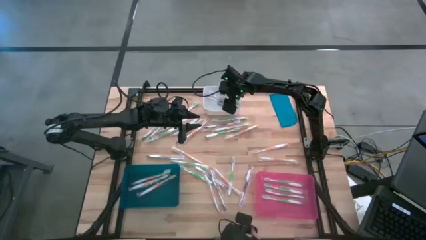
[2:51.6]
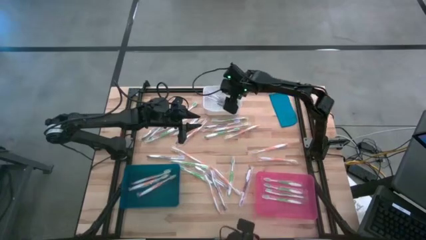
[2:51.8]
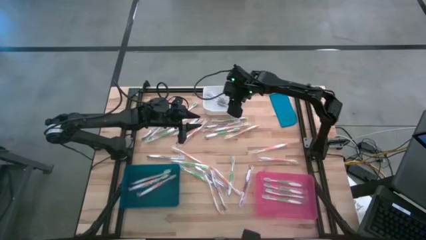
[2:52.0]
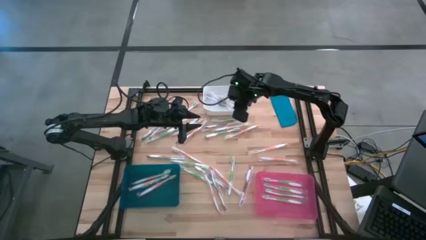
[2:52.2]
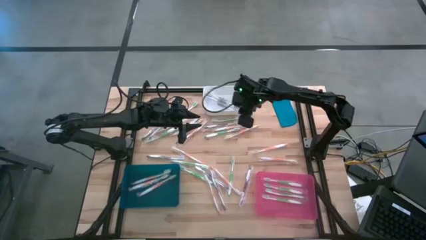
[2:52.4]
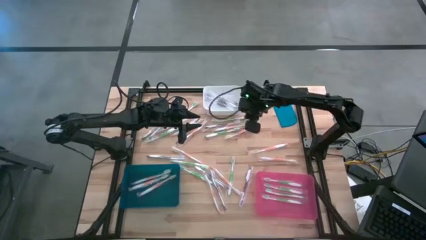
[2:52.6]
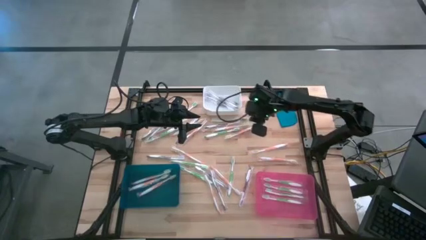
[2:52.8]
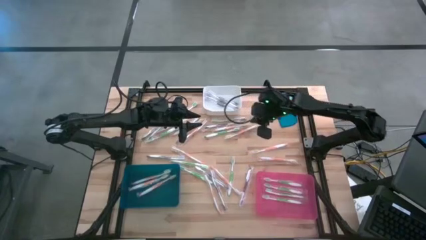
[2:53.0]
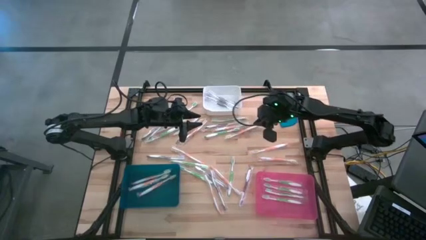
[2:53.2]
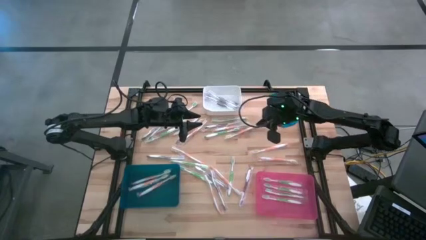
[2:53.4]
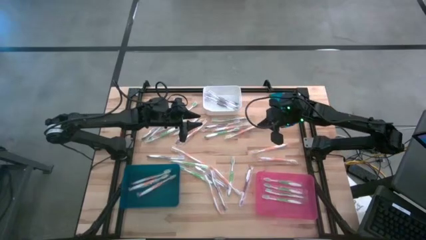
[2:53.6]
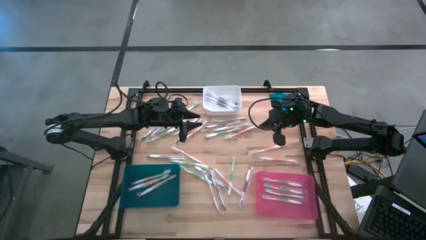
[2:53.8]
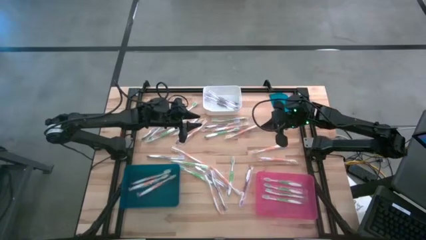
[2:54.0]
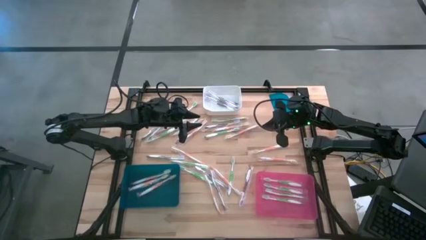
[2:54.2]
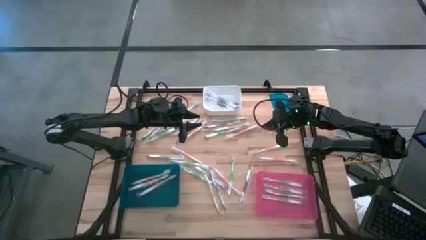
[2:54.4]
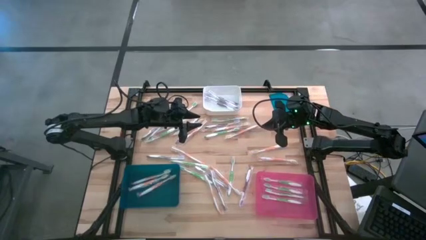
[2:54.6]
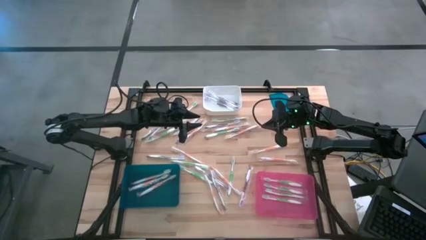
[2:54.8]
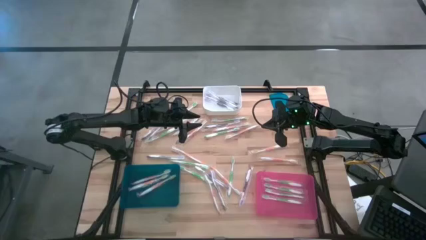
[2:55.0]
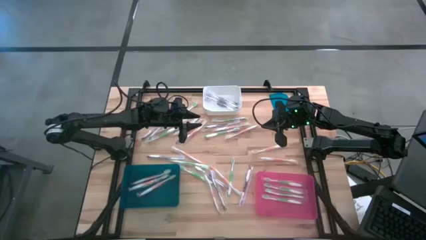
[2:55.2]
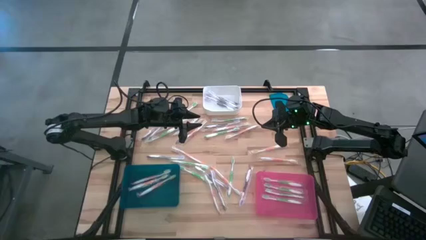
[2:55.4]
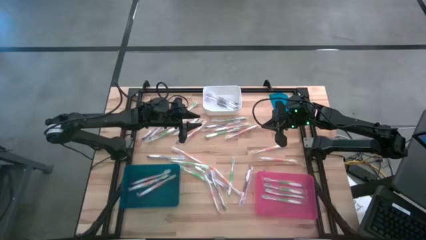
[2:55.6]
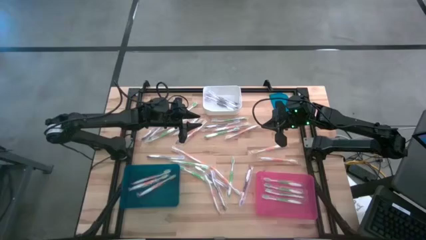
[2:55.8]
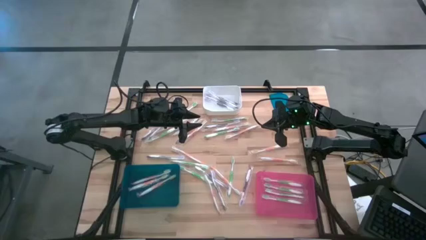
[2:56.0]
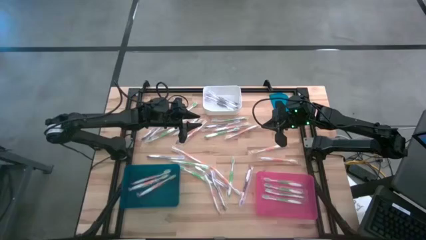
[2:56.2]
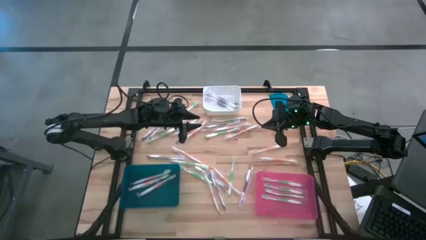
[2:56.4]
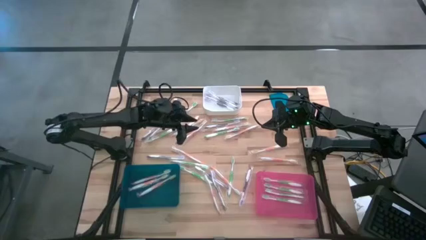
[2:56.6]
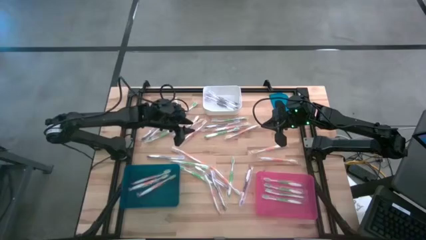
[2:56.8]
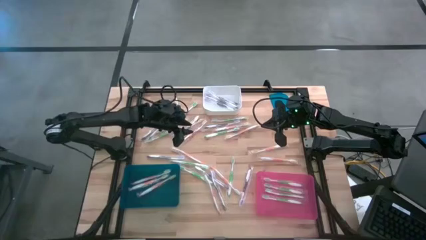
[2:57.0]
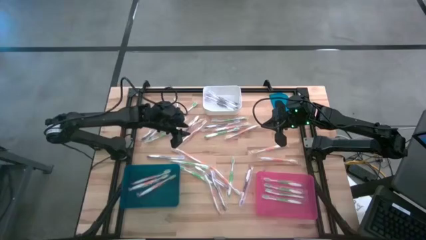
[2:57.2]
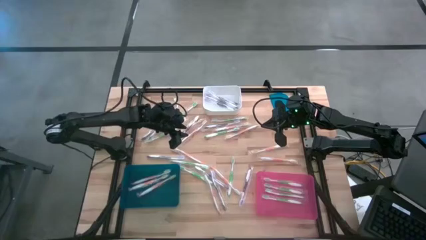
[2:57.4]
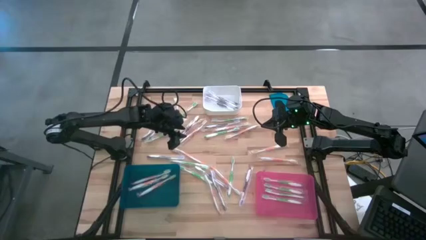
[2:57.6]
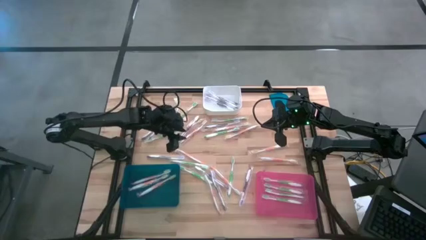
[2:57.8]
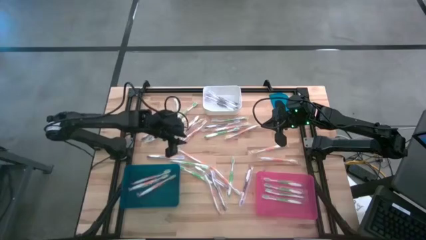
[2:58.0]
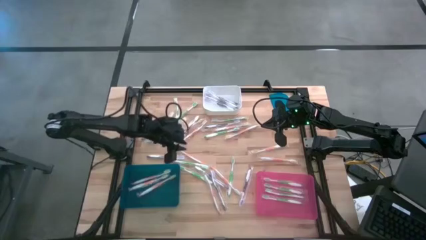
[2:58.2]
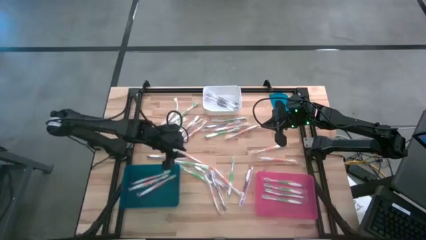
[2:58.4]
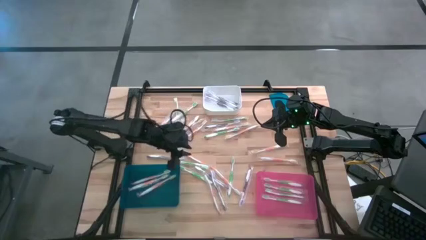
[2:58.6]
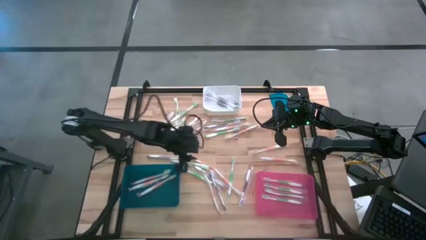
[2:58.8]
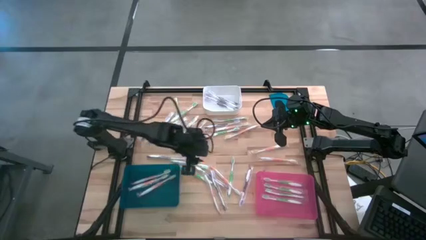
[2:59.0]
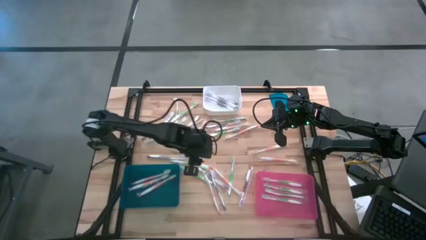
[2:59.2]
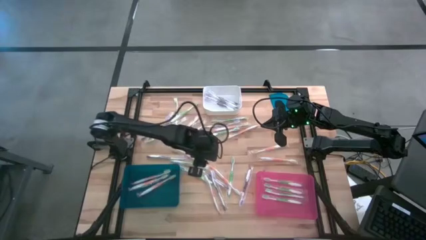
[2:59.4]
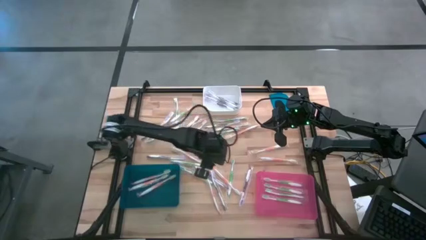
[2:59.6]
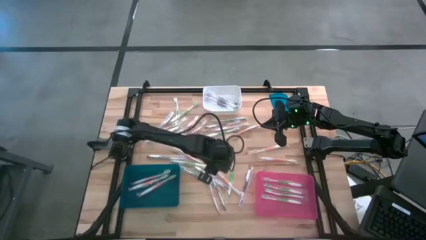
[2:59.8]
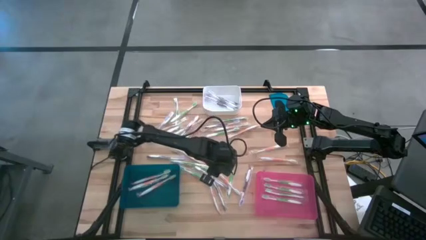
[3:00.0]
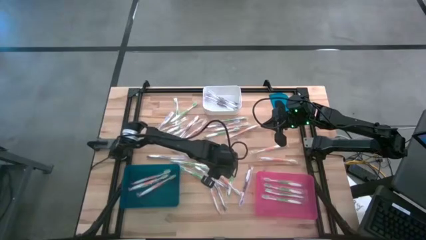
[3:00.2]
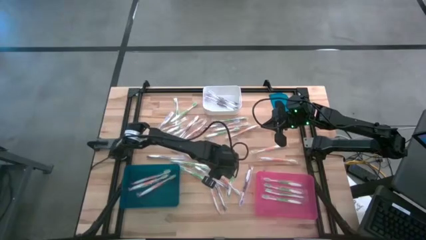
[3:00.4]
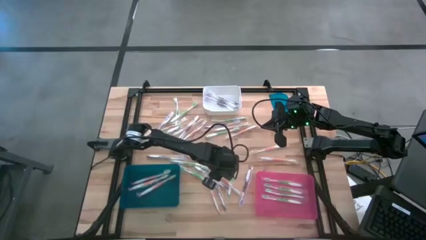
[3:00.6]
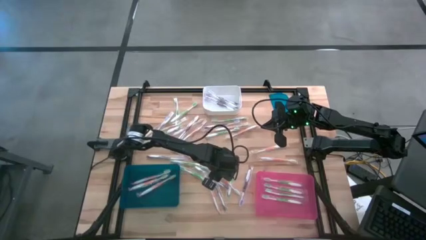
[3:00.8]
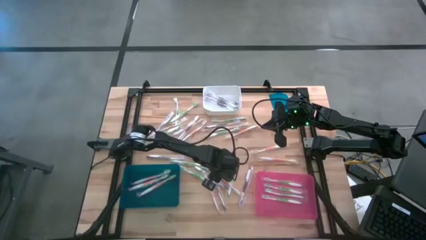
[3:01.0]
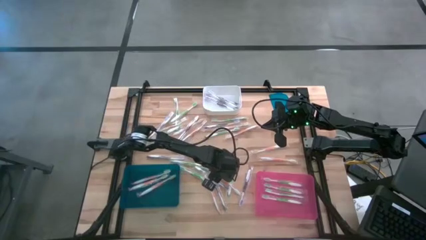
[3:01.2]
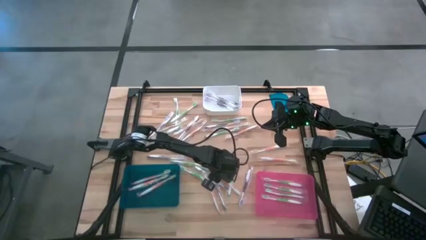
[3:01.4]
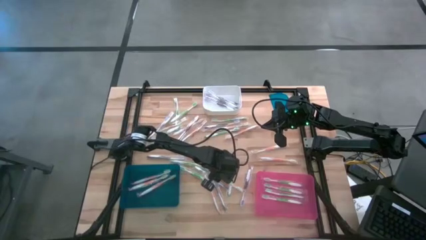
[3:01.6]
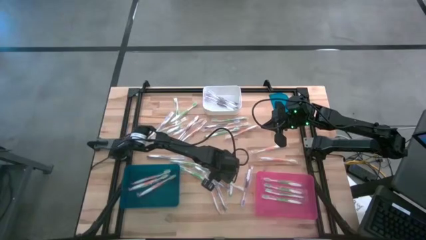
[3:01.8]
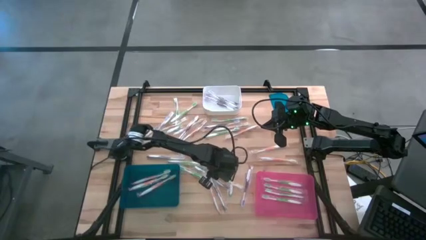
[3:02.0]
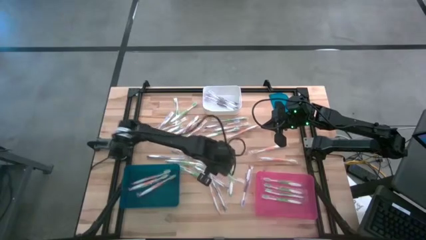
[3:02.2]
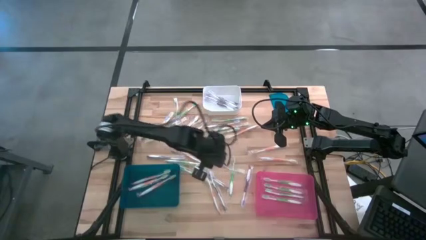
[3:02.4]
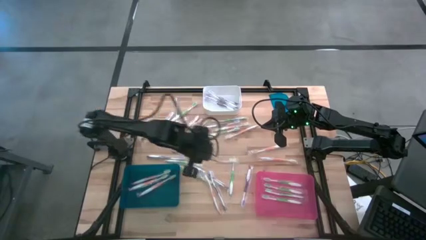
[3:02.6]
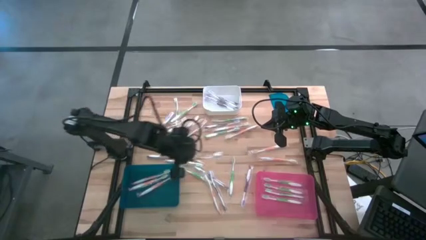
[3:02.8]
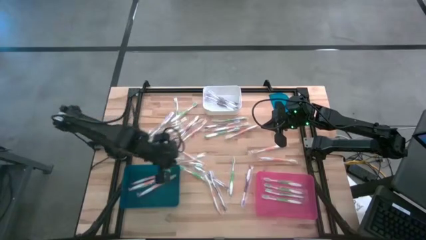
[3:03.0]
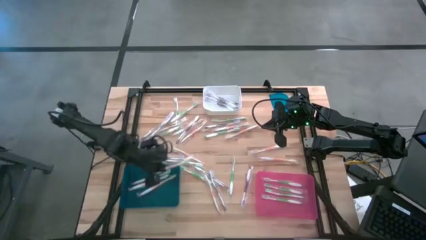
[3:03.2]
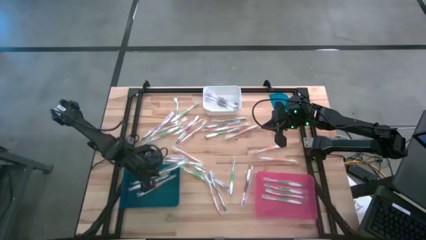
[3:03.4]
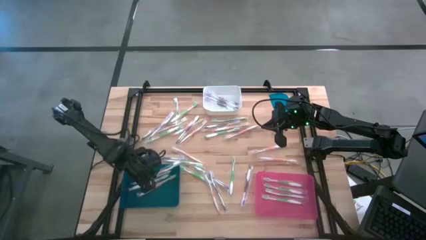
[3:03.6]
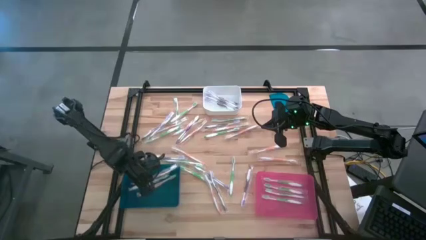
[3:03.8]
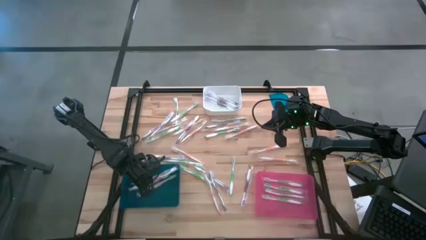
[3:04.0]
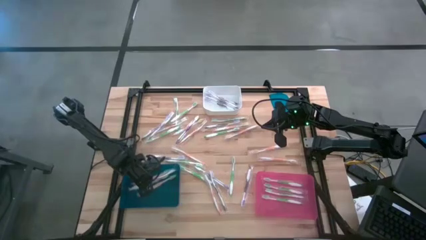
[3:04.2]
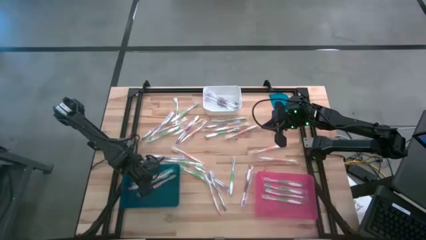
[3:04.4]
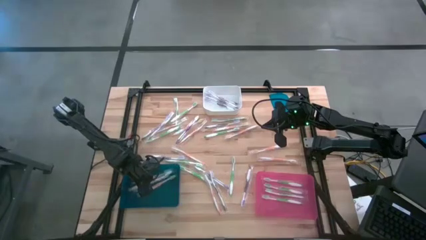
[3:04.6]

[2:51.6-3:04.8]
Task: Pick & Place Toothbrushes
Put the orange toothbrush into the blue bin
